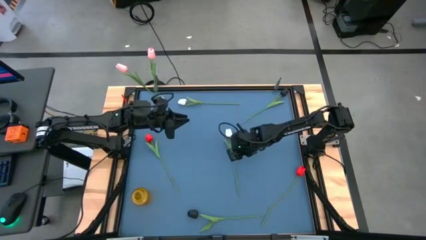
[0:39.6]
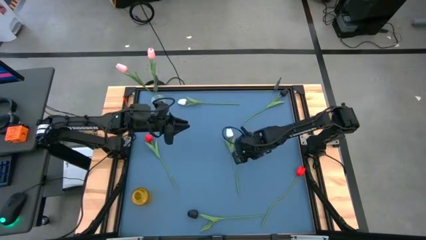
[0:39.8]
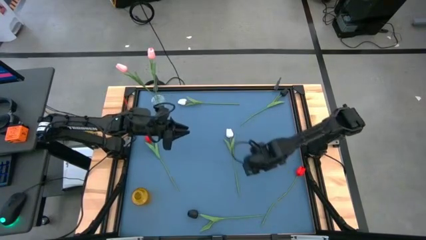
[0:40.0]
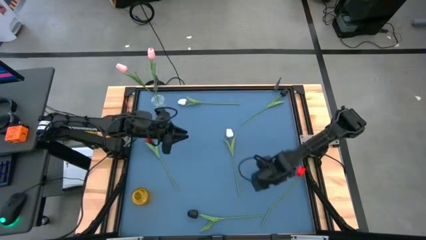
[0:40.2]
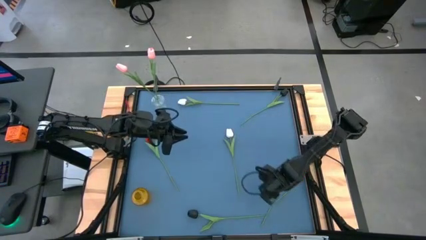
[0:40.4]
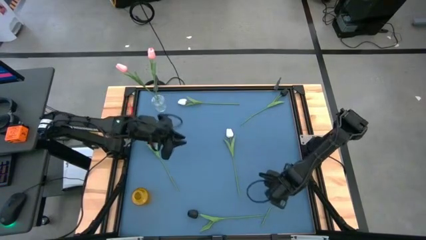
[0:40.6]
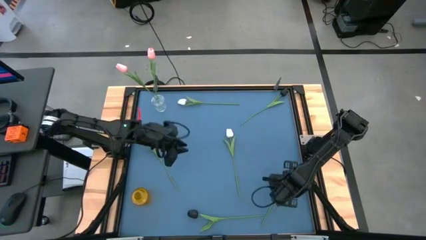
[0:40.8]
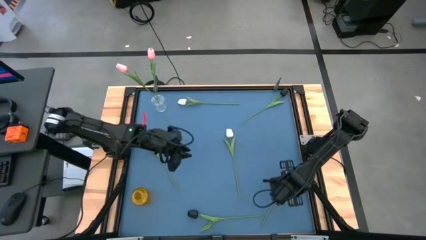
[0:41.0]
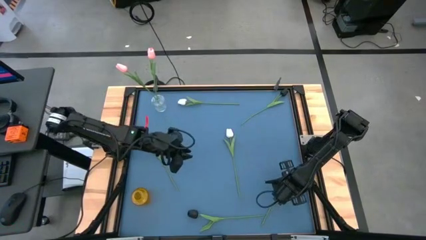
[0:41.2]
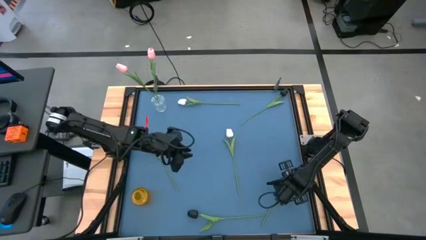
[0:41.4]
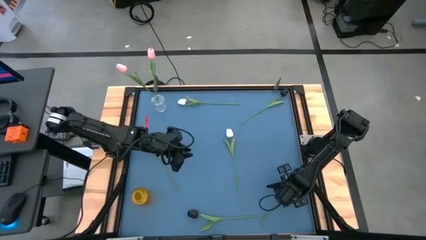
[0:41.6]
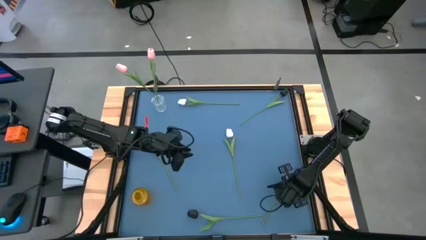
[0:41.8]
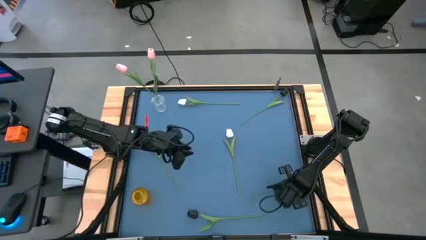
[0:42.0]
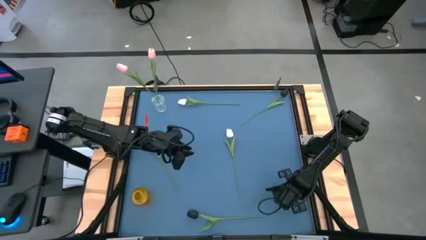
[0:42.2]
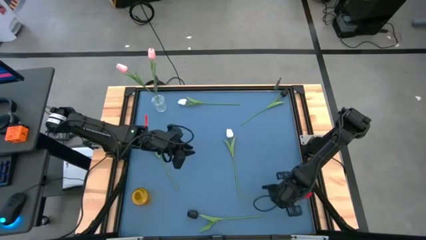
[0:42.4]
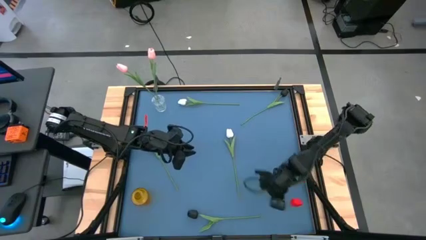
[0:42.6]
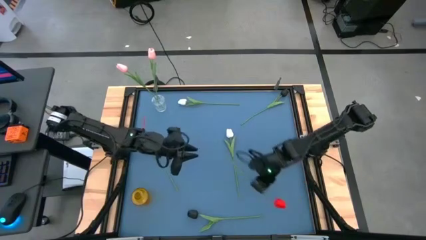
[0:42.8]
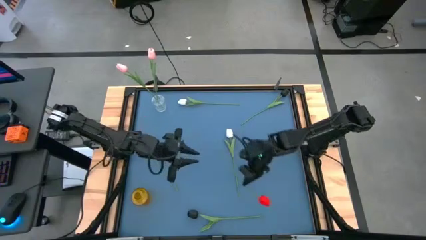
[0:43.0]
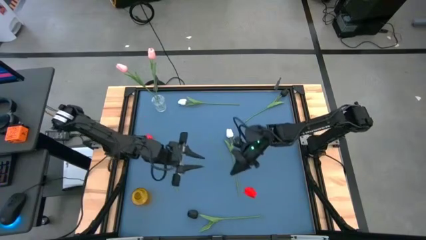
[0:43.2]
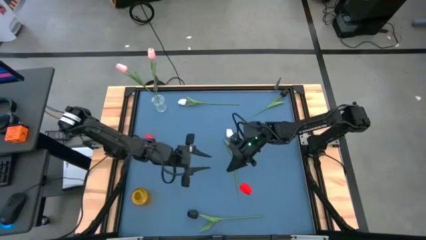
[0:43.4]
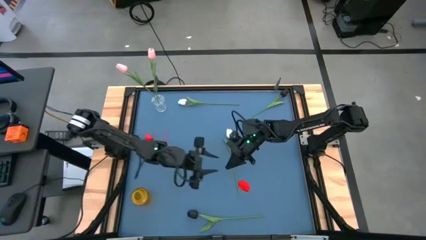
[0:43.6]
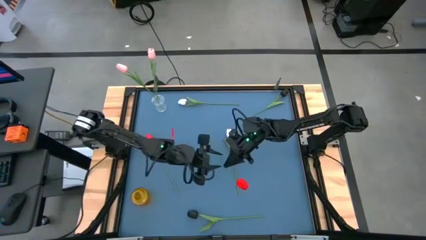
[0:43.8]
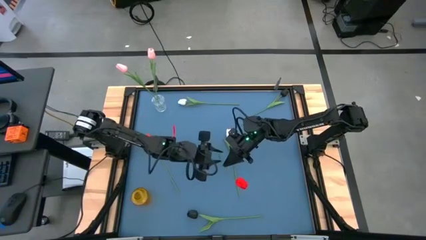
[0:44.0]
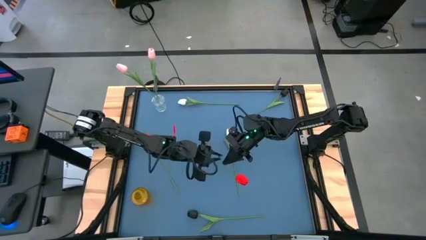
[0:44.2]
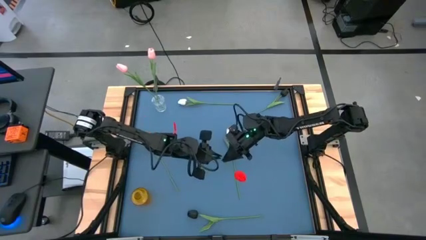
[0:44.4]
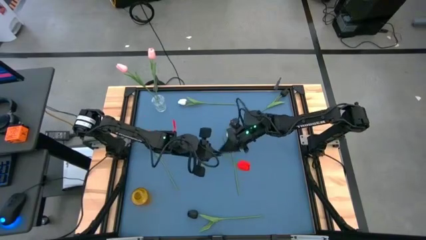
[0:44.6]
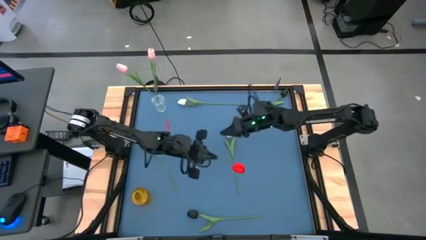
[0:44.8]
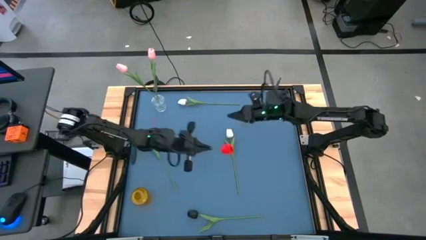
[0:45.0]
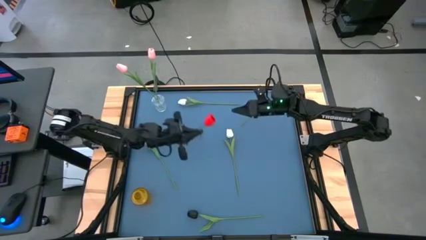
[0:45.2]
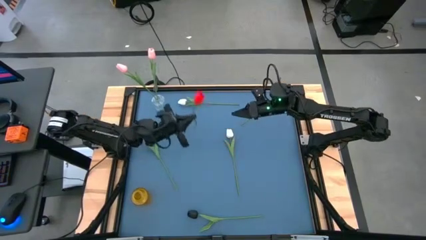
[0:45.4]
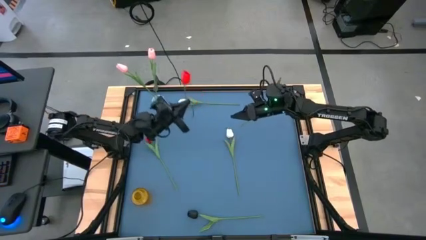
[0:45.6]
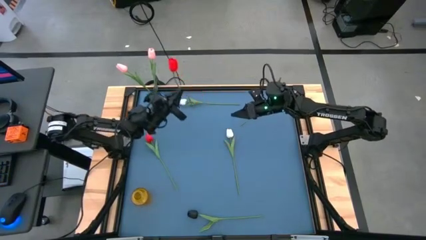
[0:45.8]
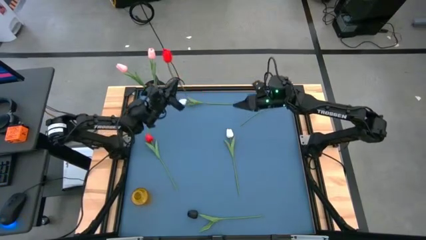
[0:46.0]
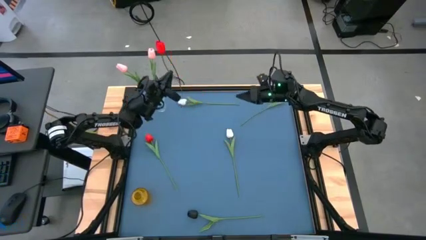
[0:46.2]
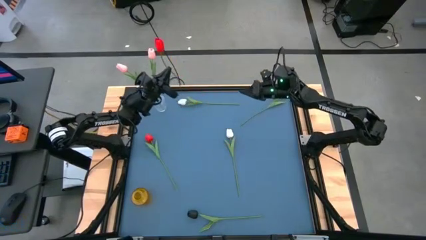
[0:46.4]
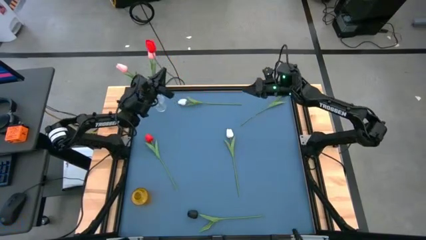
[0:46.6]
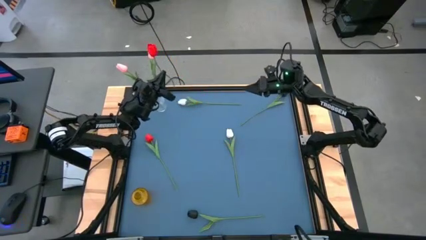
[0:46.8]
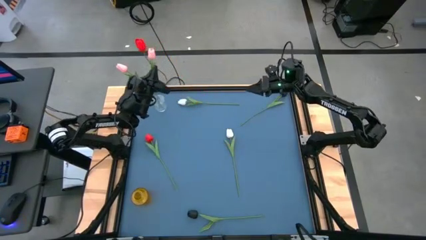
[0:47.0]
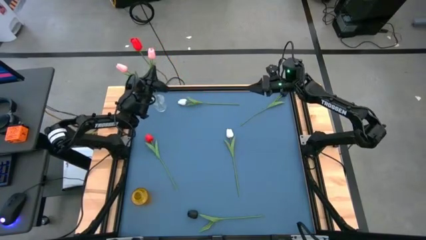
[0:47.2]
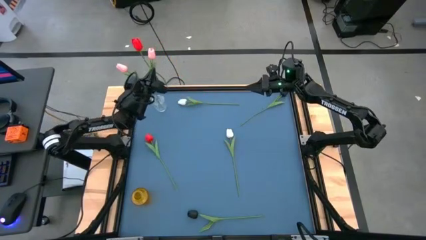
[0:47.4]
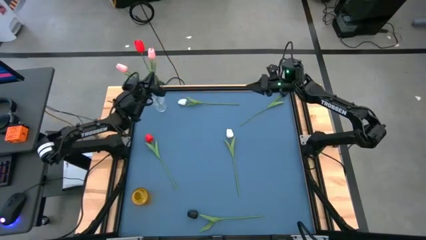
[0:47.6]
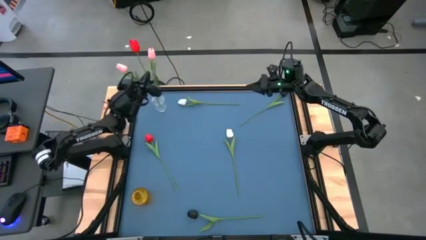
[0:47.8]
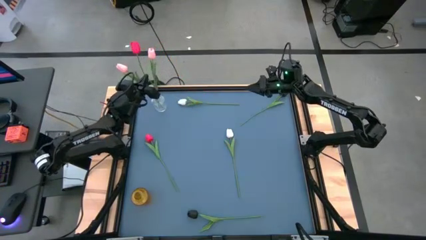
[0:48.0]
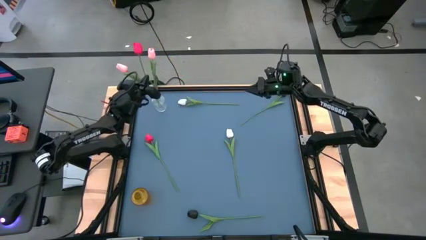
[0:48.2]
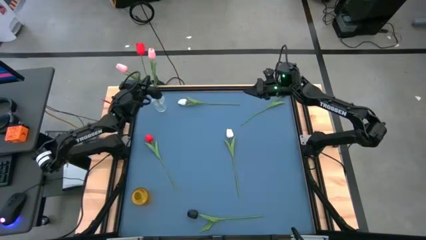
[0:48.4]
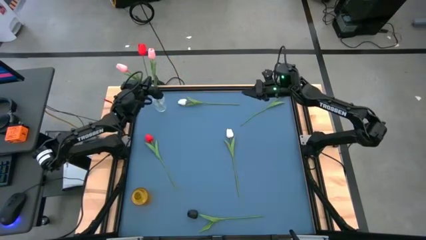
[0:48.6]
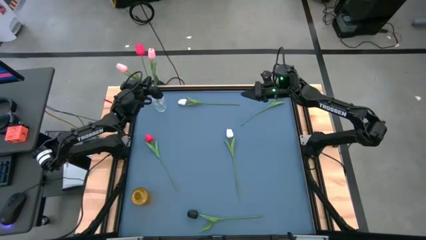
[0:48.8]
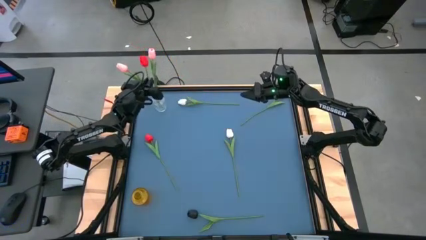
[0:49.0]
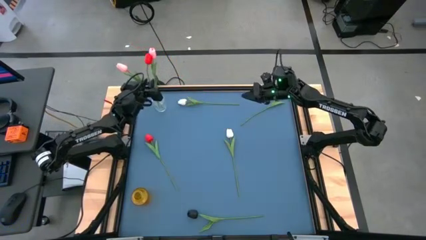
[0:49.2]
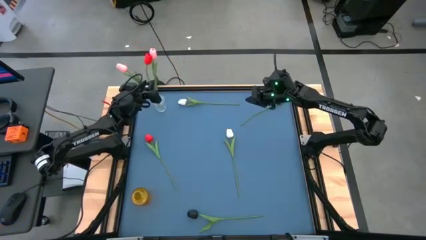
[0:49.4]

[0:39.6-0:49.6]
Task: Sort flowers into vase by color
Put the bottom red tulip into the transparent vase
